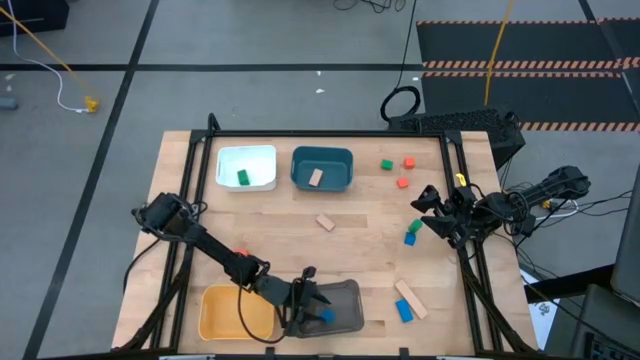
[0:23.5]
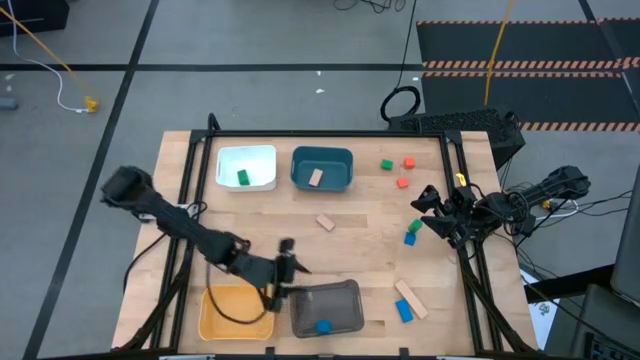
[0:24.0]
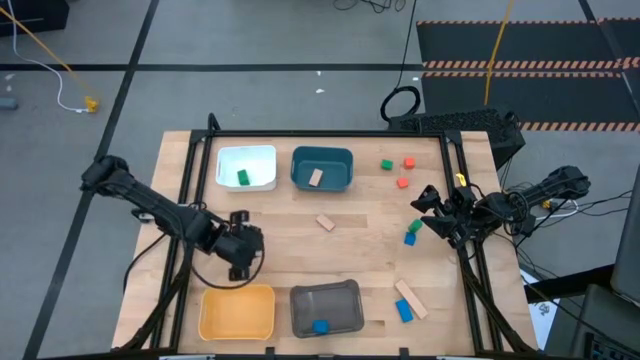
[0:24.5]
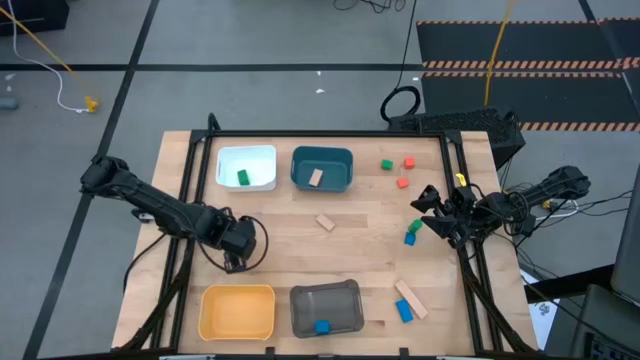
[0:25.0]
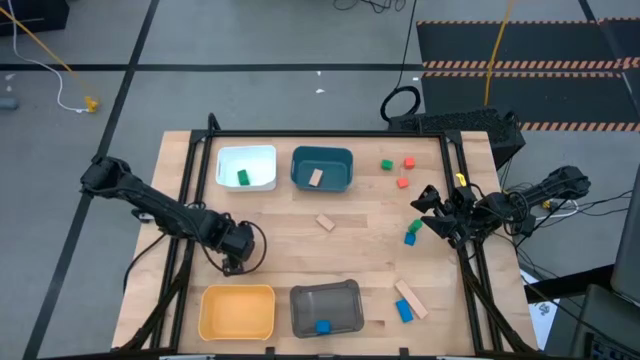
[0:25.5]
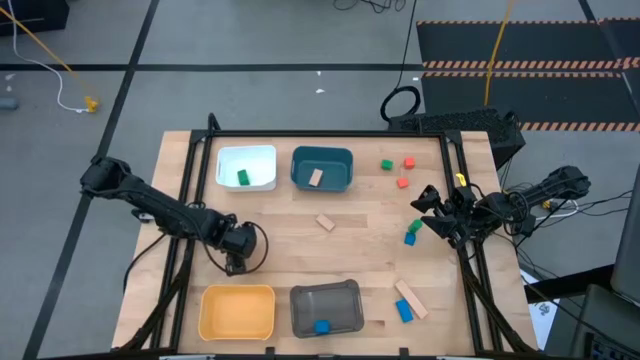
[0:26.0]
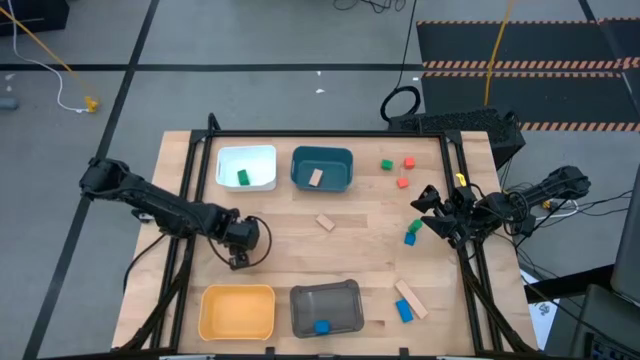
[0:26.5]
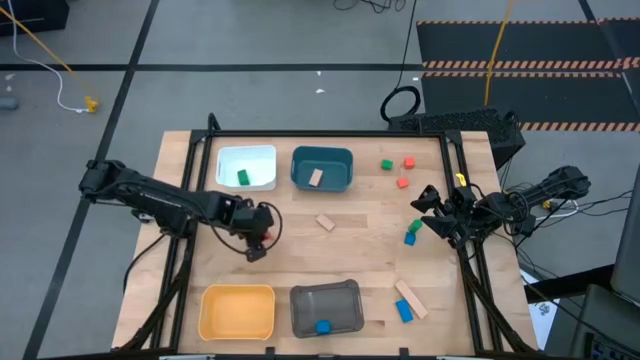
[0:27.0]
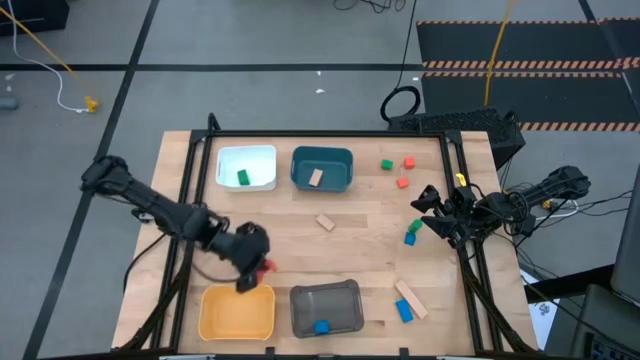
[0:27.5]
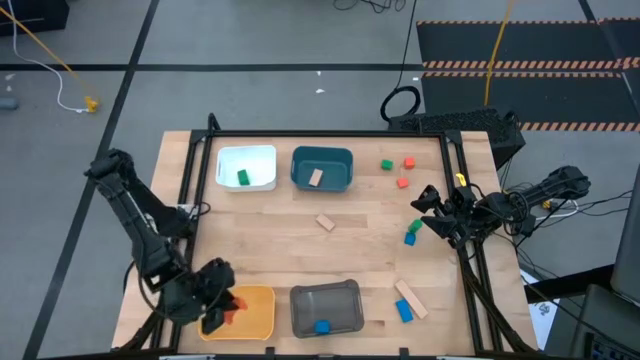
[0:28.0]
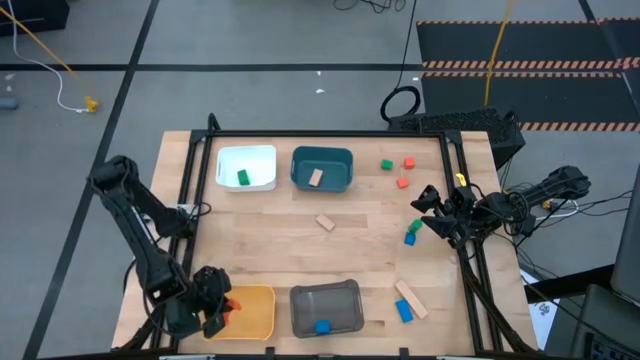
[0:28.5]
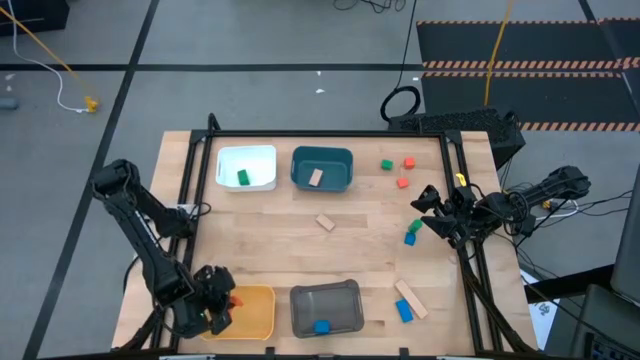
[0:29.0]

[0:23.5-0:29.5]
Task: Sort & place blocks by color
Put the bottom left orange block into the yellow bin

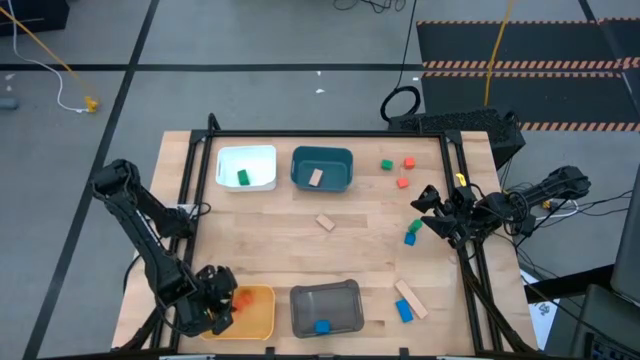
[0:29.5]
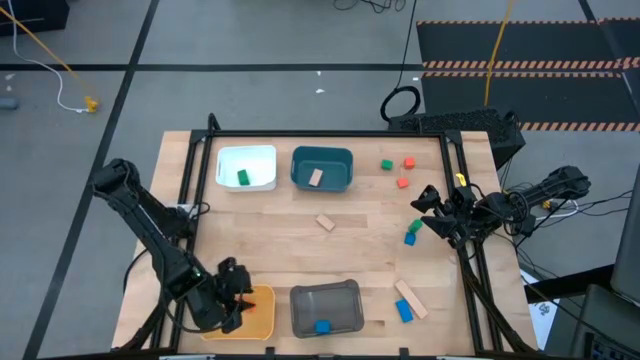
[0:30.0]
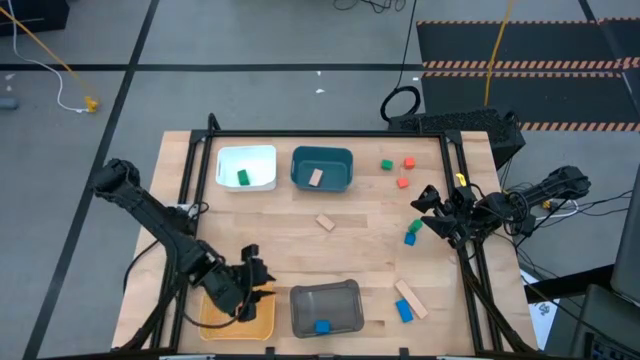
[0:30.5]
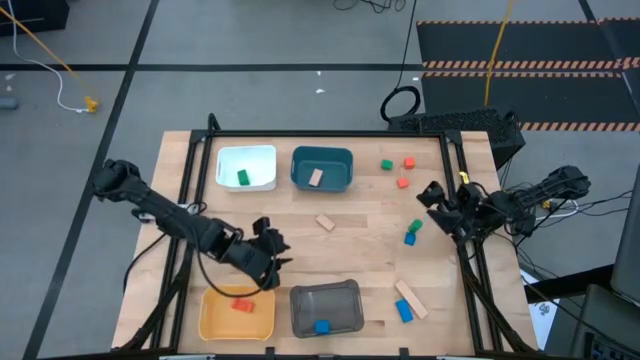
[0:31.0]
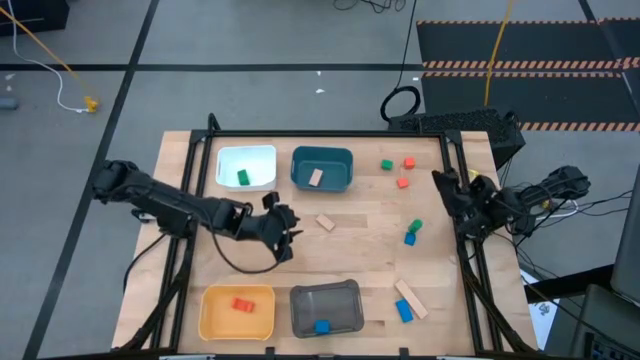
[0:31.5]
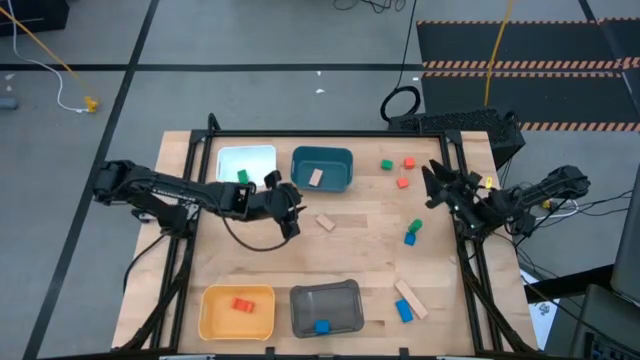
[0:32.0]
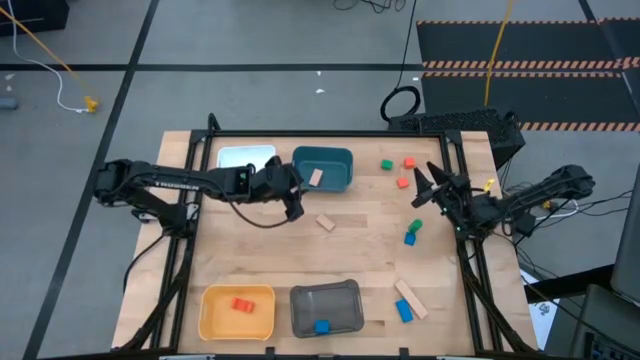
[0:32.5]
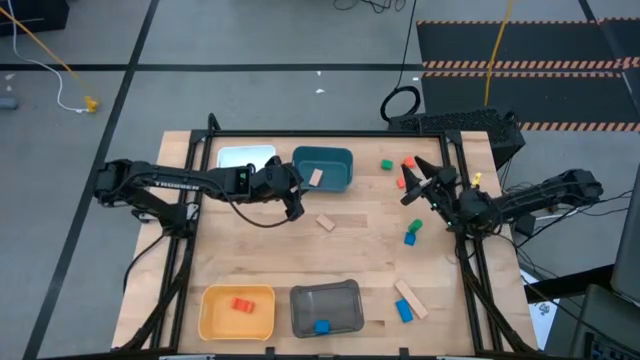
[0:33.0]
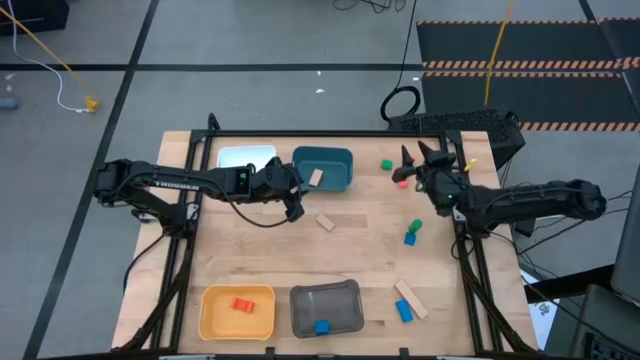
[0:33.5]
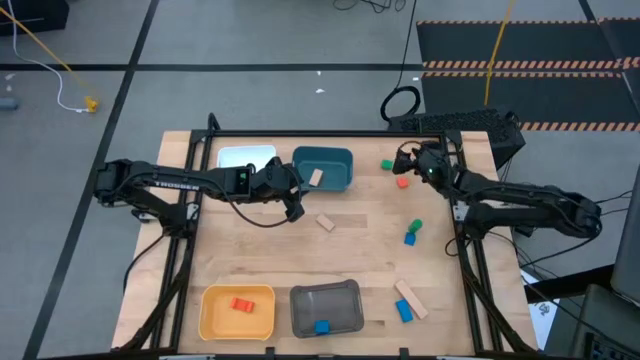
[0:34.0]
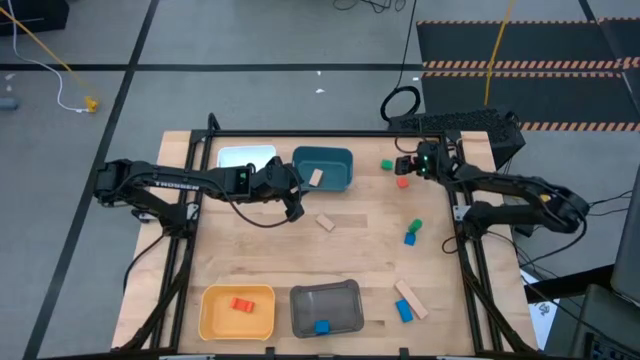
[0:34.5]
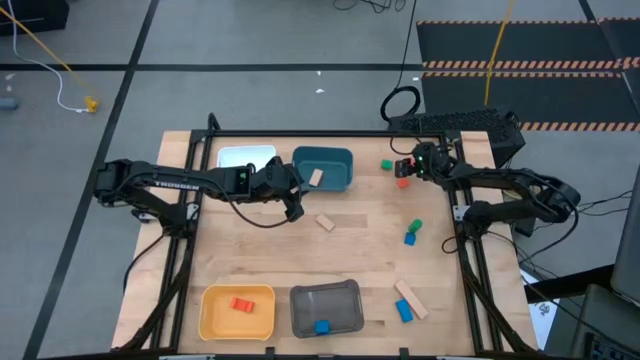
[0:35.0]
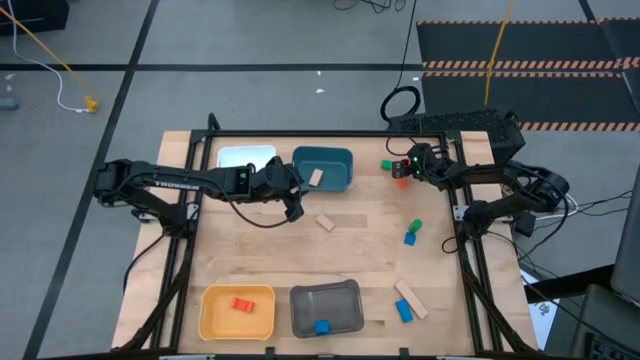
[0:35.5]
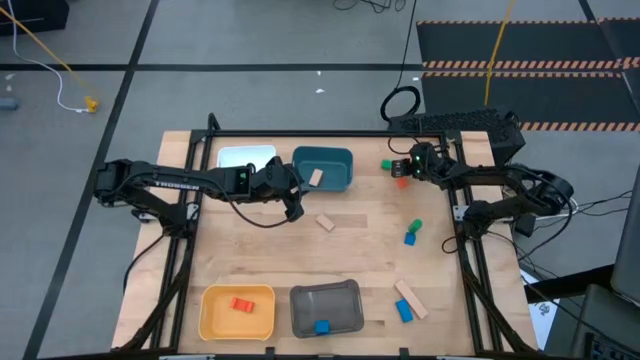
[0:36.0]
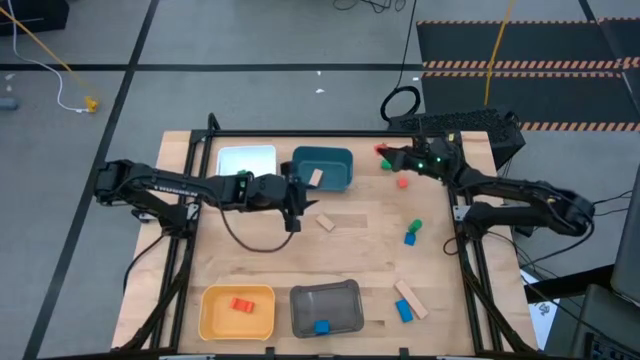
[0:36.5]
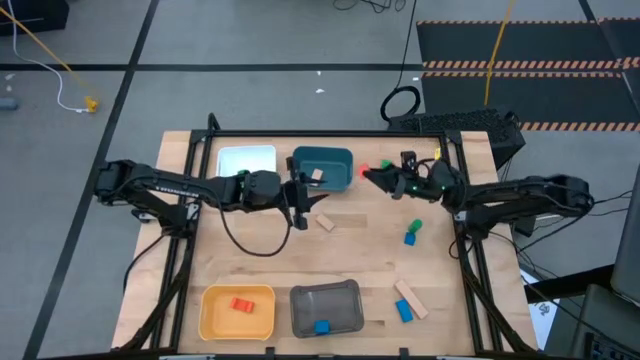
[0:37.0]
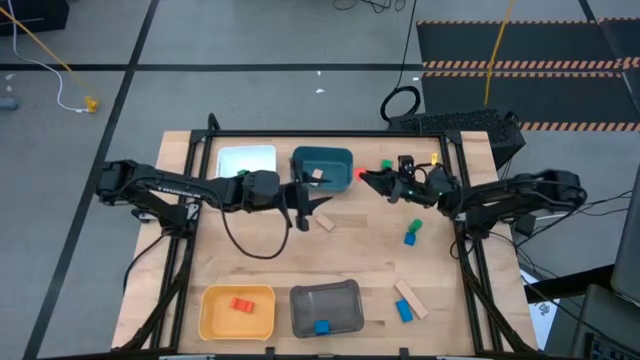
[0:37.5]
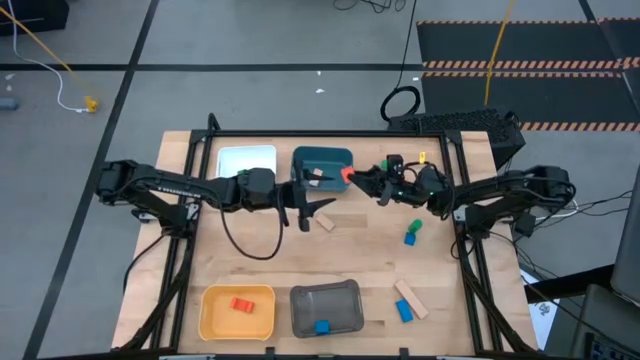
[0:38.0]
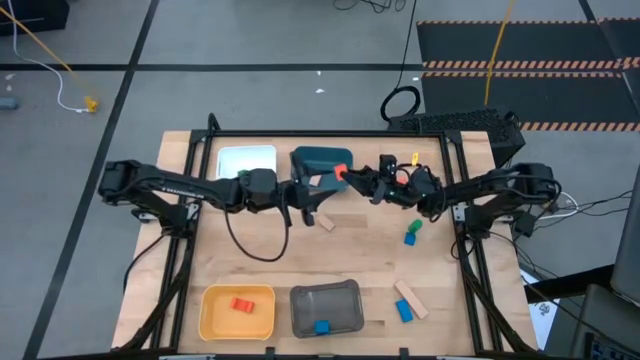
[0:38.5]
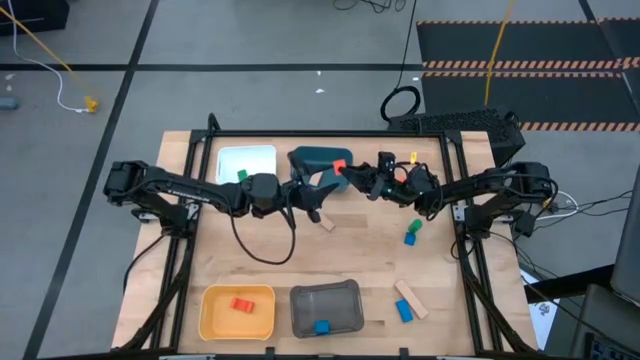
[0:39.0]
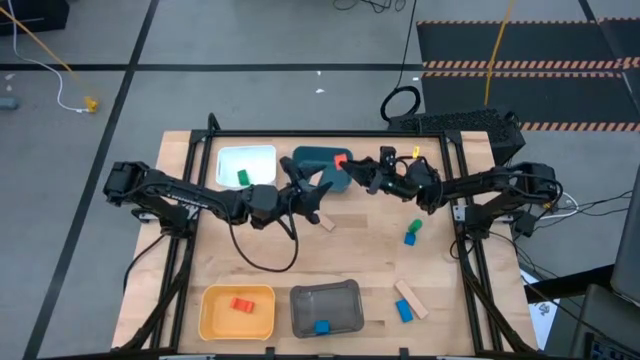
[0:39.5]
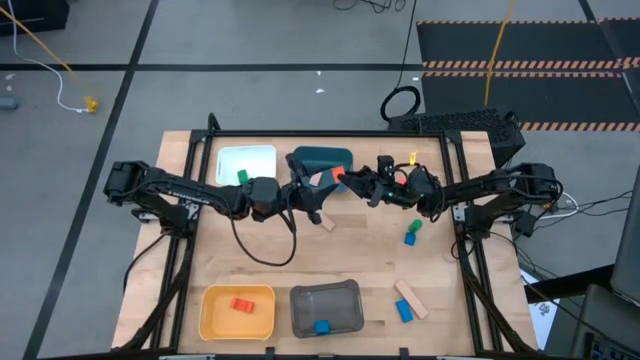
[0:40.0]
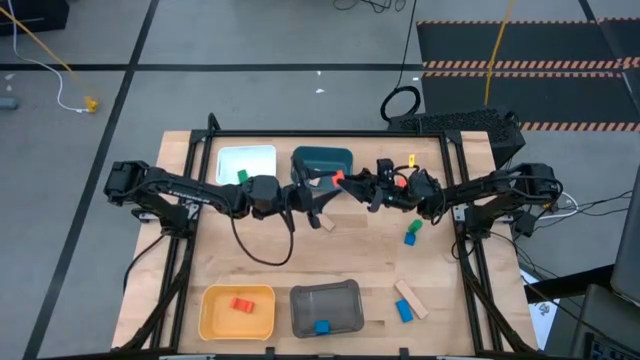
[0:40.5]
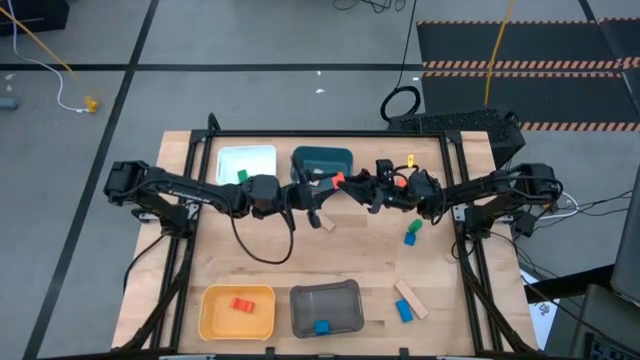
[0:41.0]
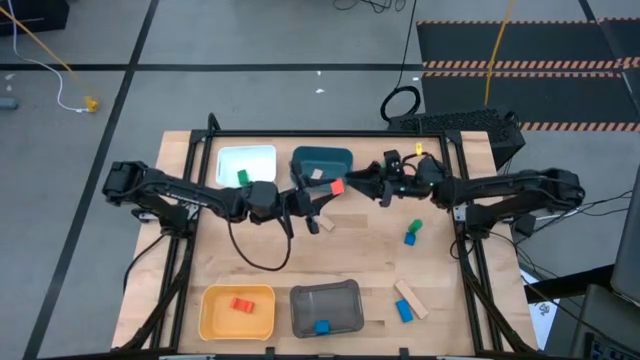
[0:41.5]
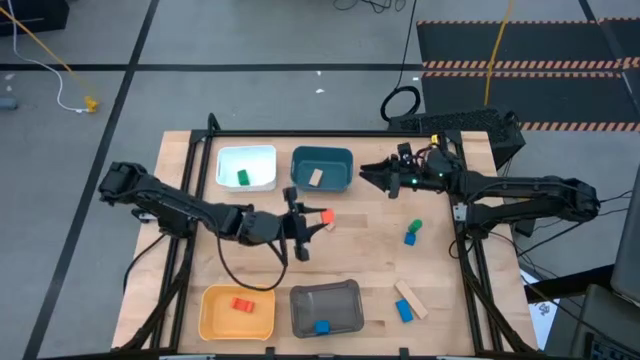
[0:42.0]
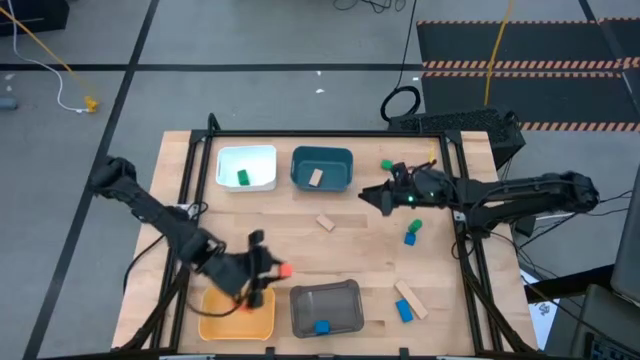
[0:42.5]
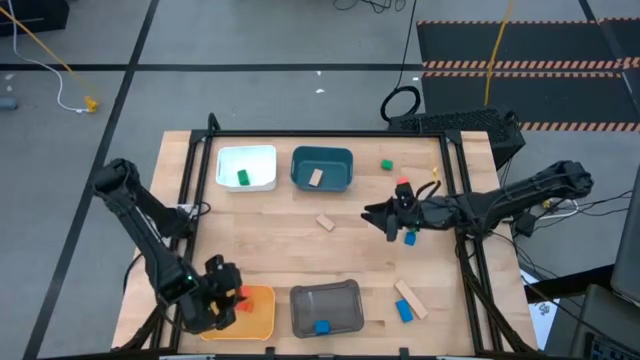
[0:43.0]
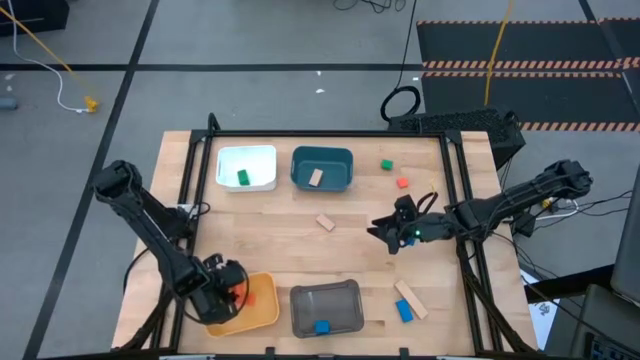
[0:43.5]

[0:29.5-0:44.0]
Put the top orange block into the yellow bin
